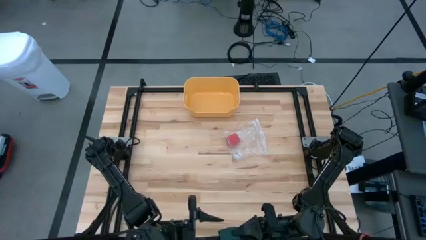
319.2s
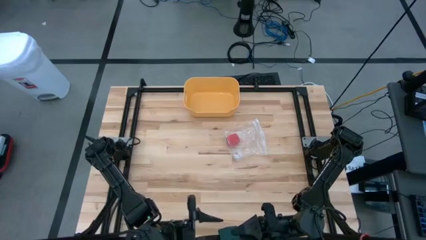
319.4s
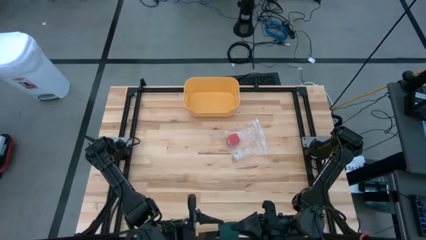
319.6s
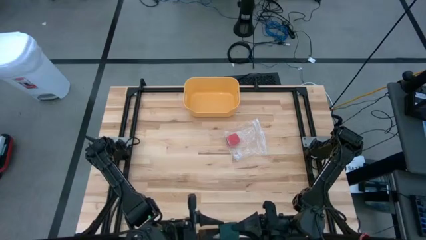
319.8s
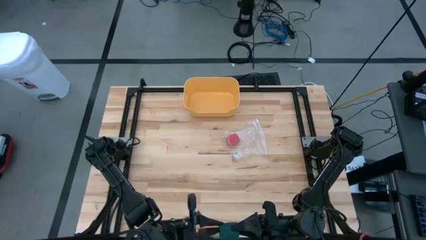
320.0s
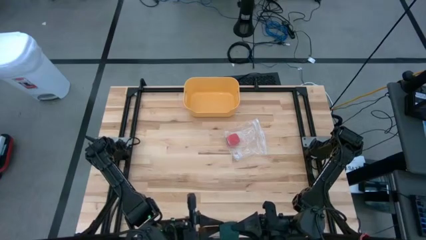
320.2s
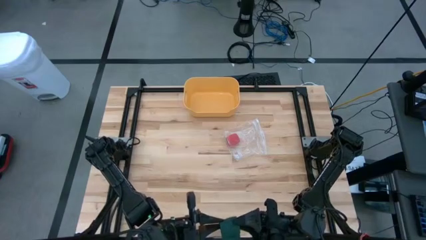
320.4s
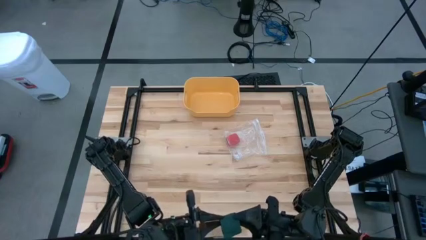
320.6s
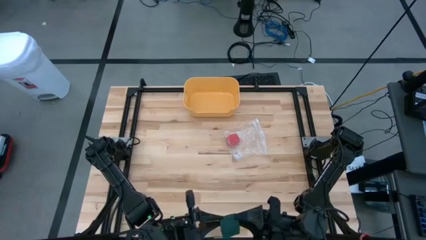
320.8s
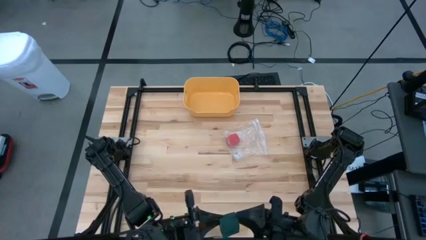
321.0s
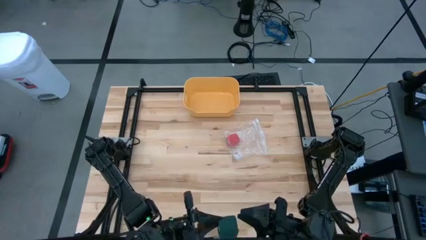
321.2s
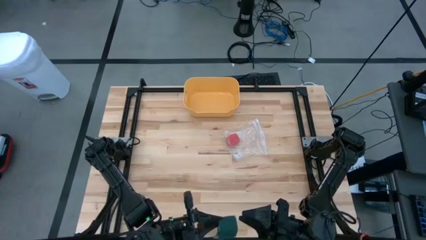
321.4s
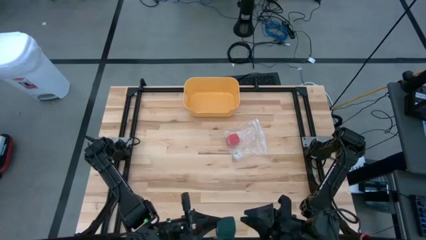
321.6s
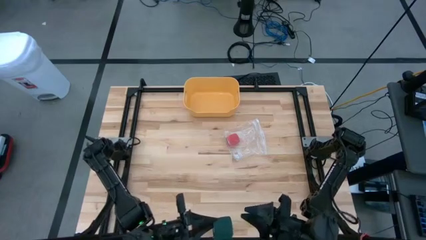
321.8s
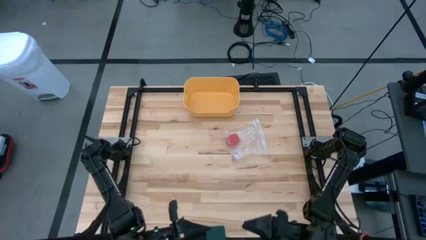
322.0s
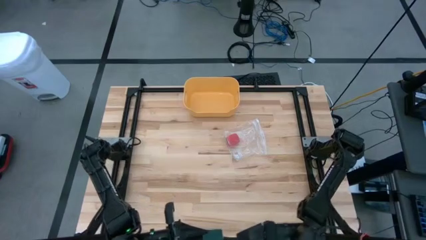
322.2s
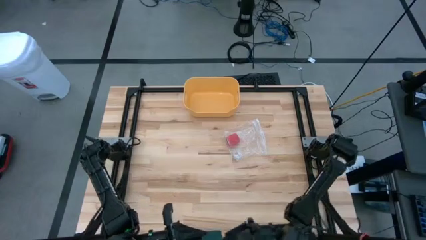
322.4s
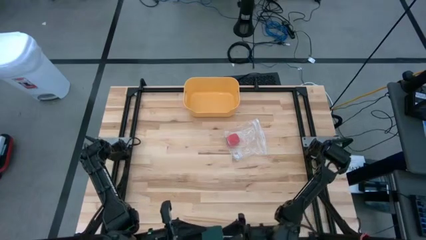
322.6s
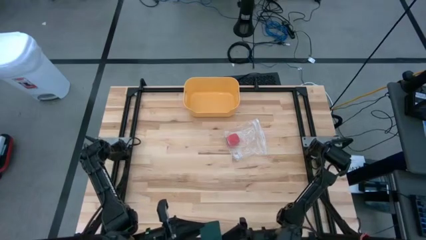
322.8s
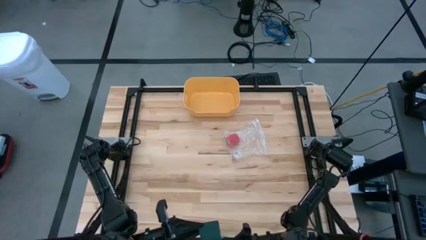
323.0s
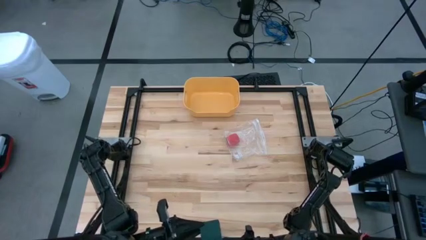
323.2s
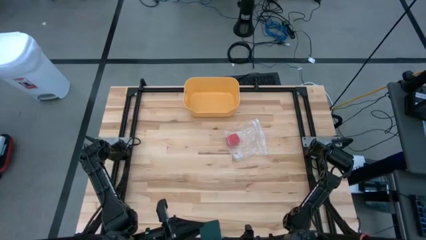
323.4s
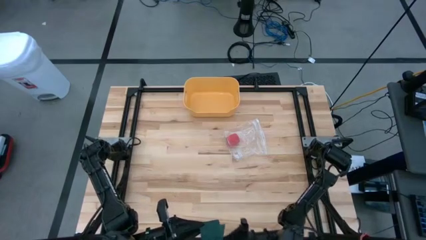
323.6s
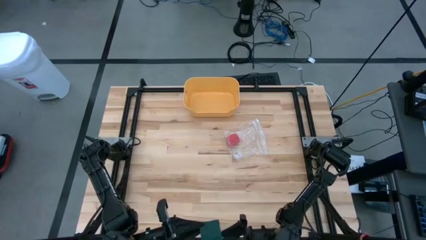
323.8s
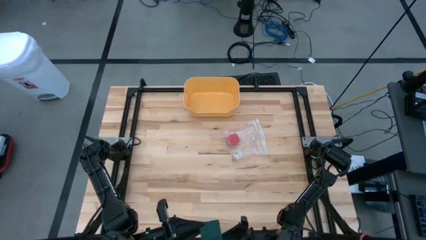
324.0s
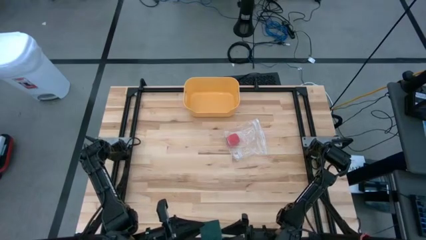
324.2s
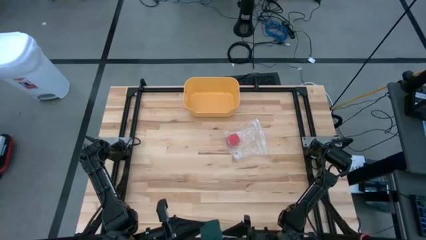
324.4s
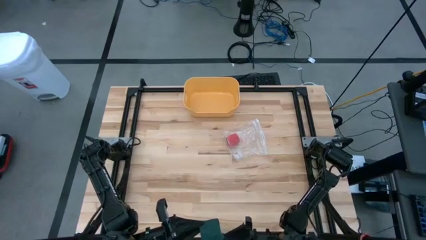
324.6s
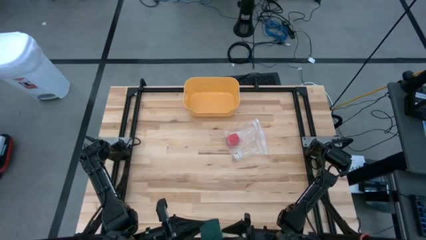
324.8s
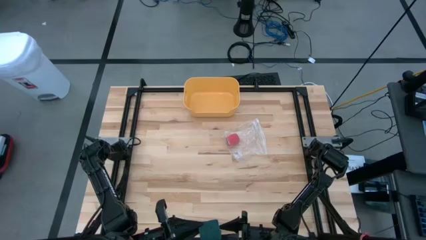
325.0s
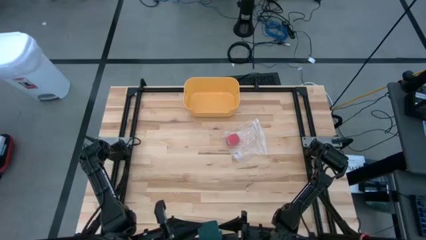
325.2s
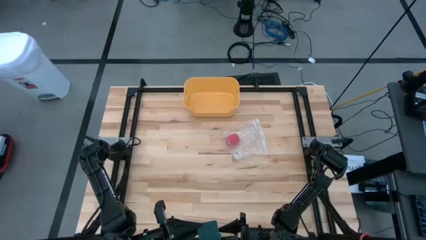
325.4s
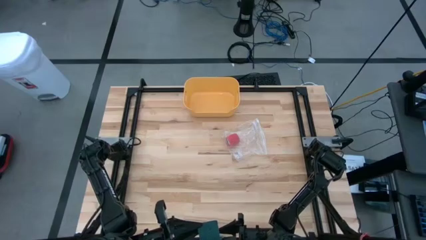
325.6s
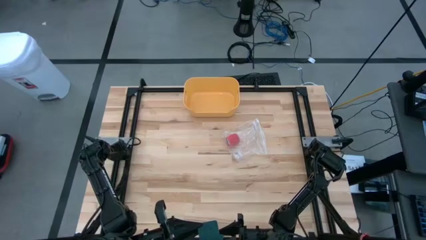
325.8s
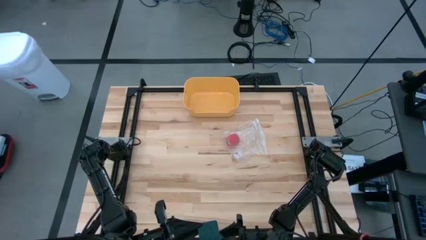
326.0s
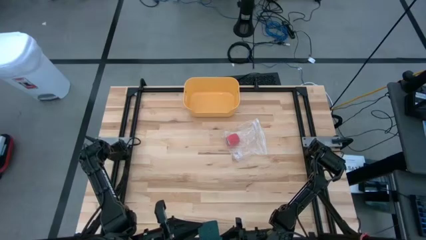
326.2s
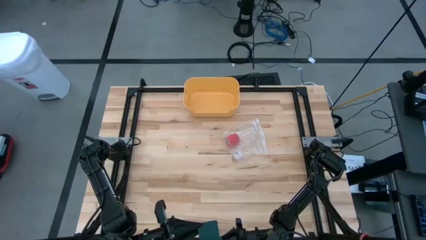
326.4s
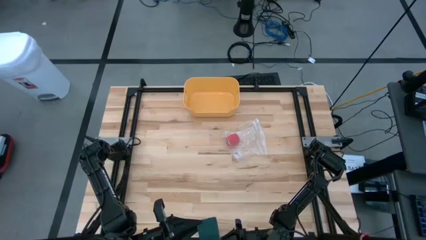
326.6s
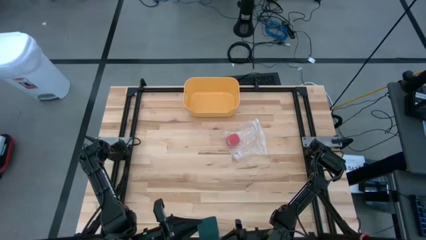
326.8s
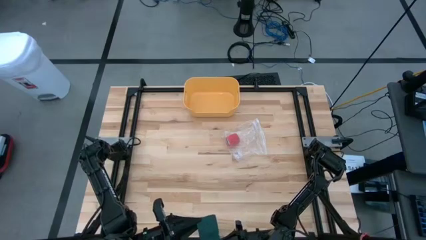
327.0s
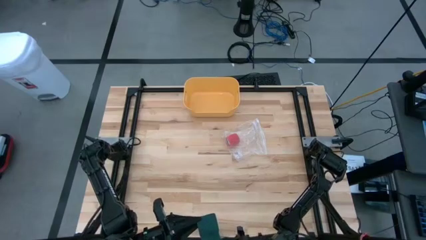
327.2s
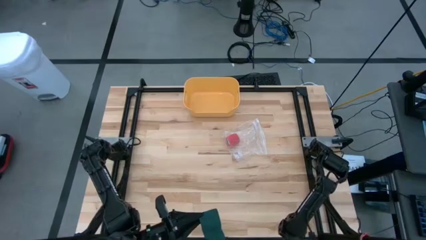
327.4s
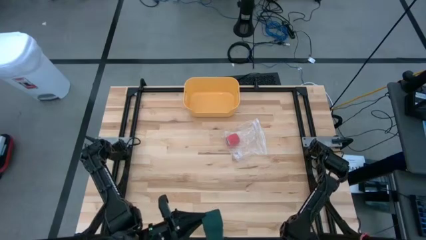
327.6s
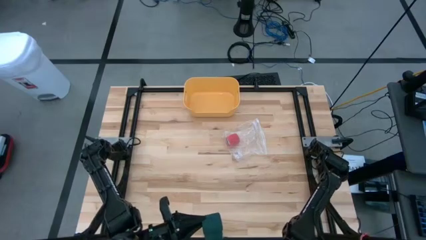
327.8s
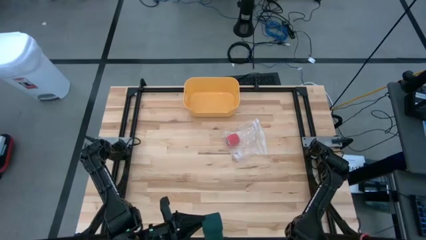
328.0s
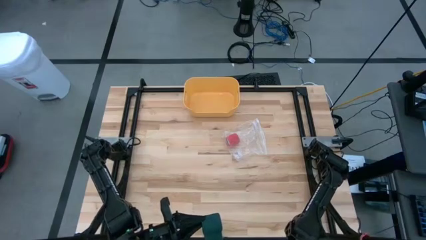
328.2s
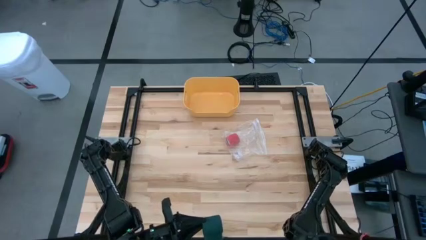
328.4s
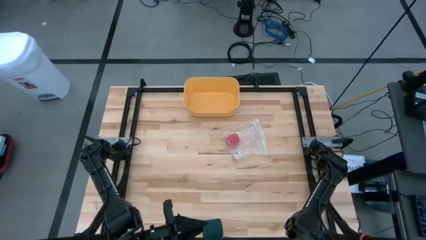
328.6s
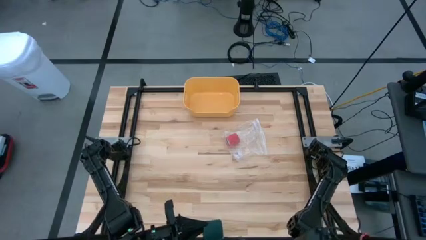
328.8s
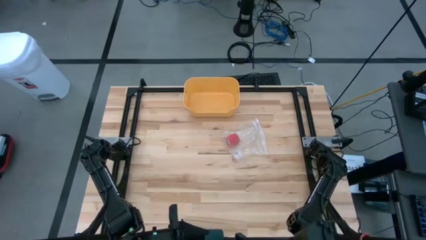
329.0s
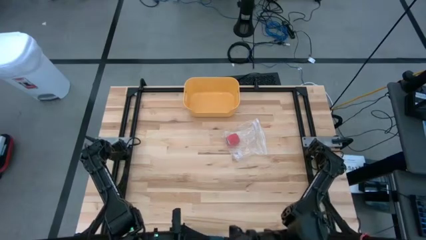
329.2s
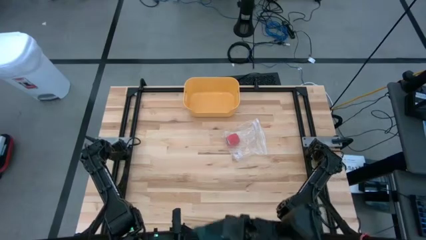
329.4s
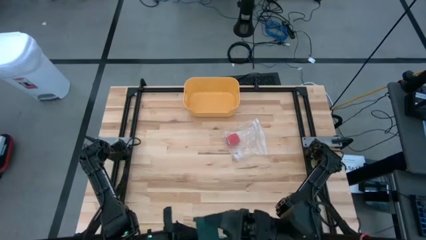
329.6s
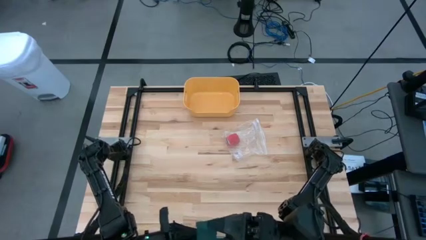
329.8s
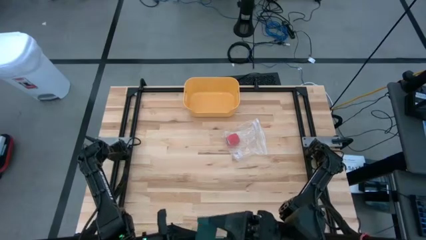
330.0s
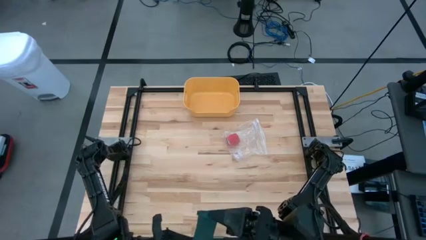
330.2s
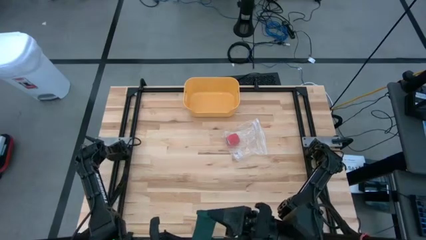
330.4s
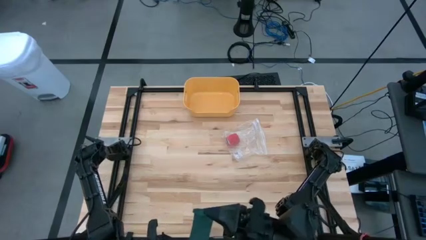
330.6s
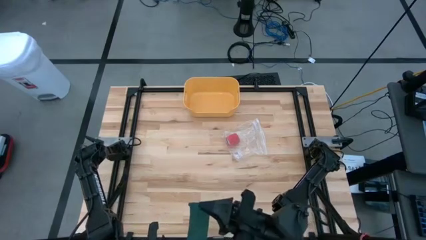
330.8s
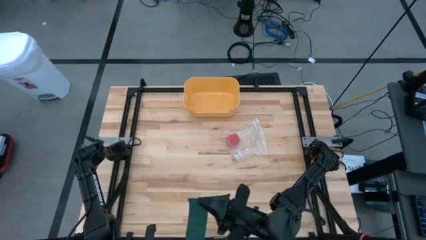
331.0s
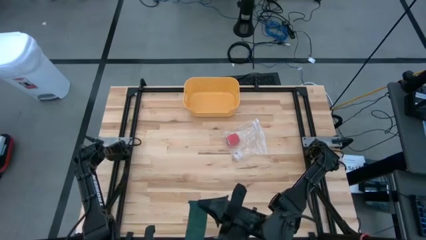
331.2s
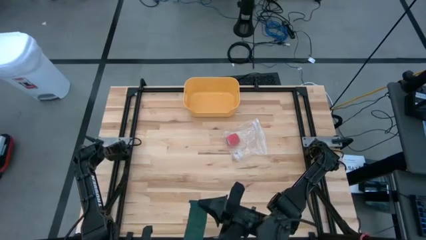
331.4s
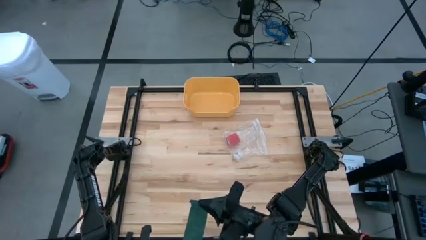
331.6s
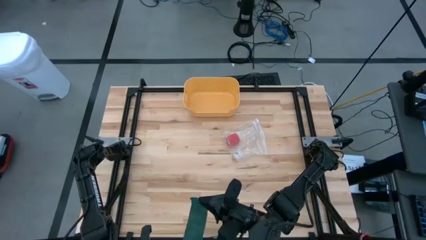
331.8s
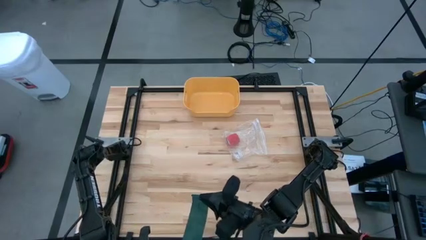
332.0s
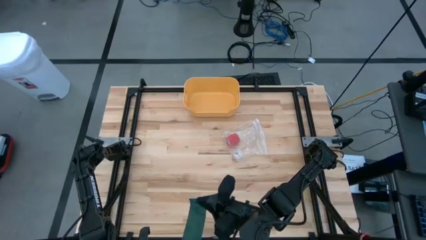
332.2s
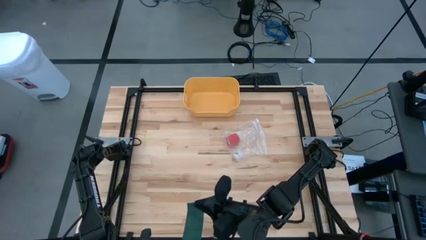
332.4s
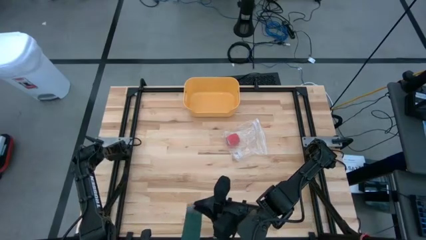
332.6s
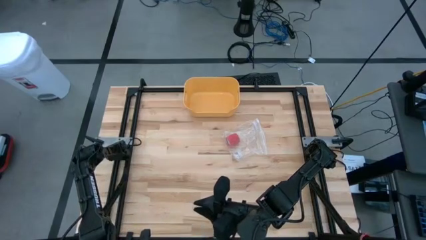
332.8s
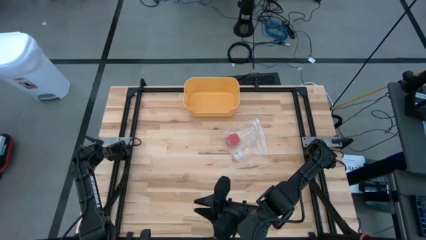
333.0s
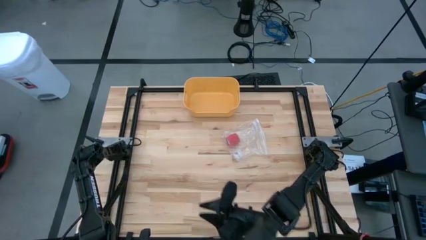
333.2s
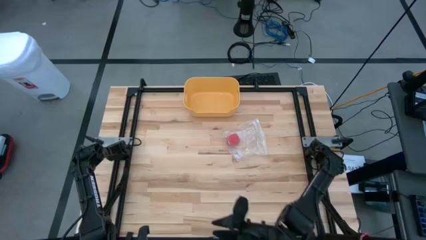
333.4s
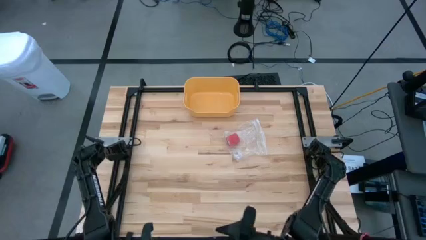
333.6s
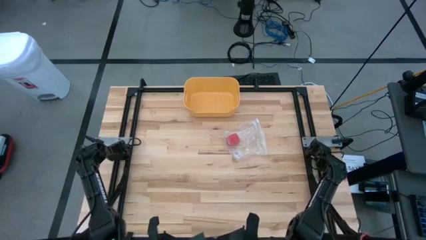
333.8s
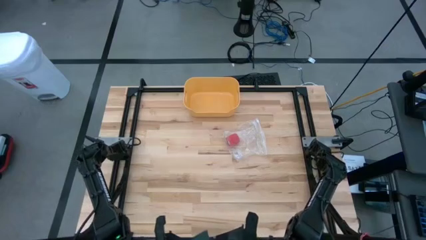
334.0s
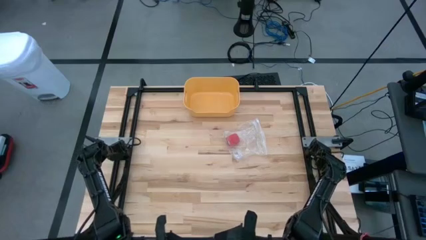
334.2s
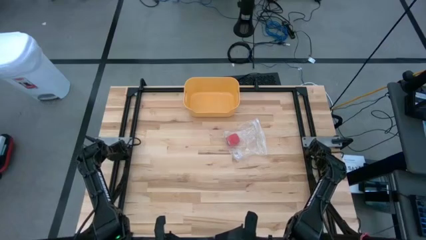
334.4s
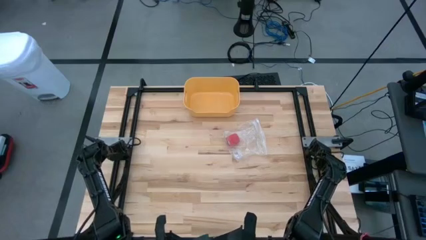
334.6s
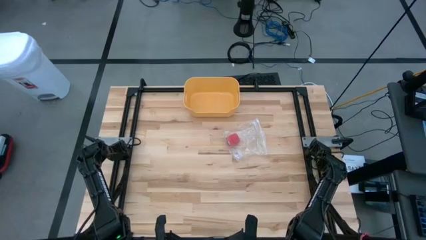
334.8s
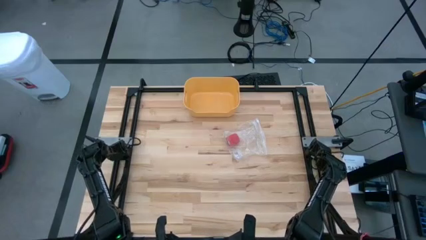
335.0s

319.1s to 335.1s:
Task: Roll bandage
Roll the green bandage
